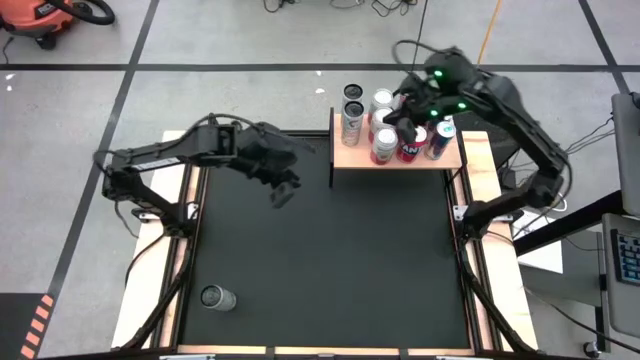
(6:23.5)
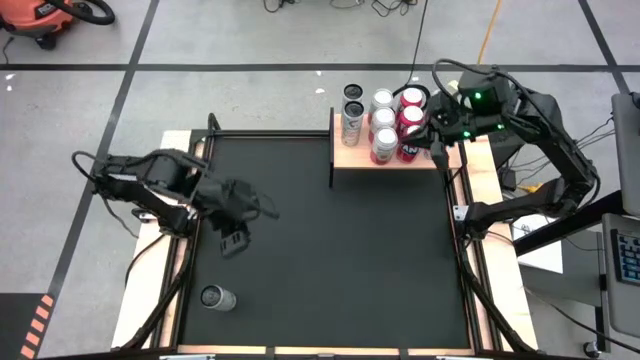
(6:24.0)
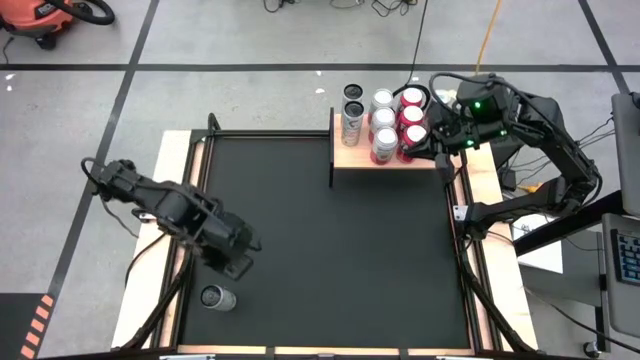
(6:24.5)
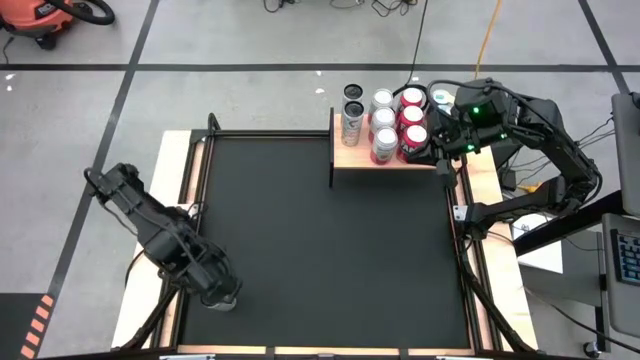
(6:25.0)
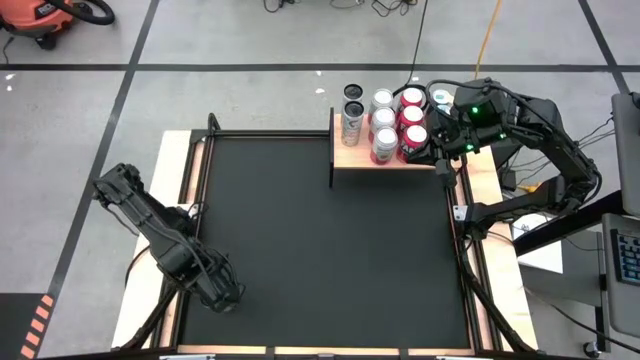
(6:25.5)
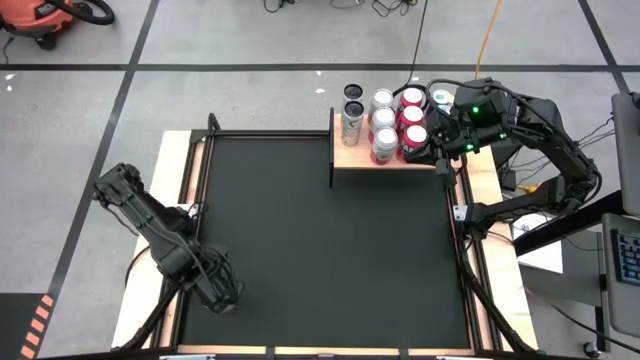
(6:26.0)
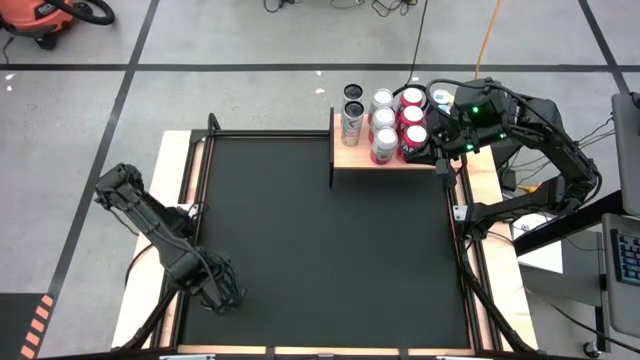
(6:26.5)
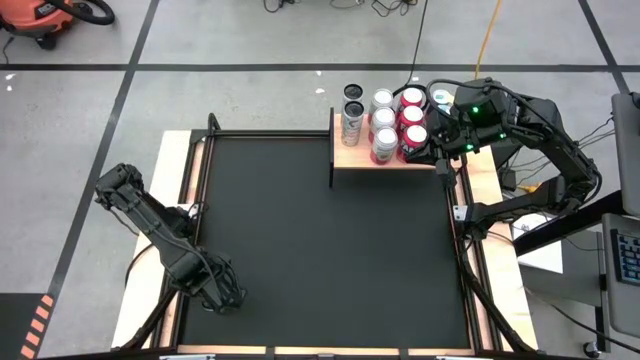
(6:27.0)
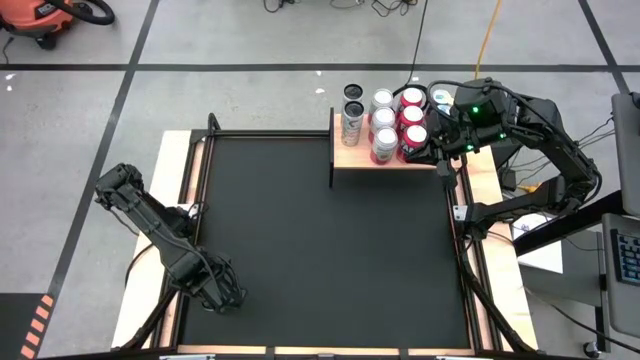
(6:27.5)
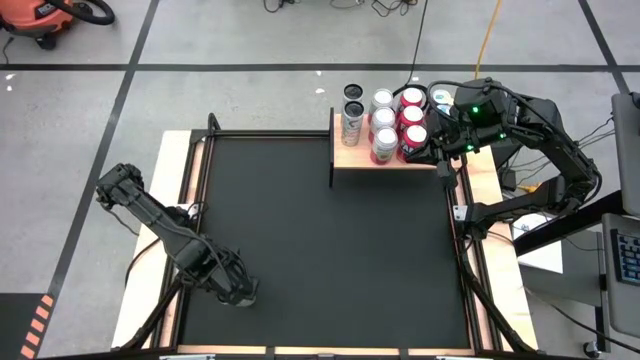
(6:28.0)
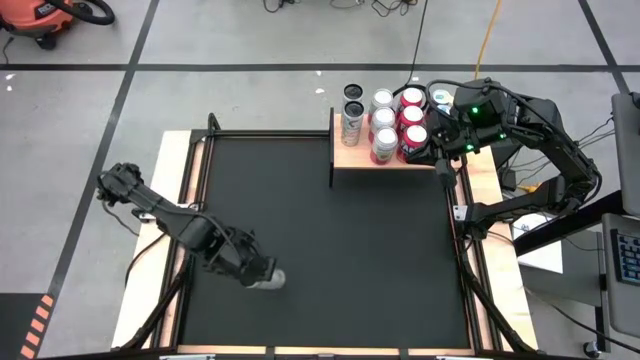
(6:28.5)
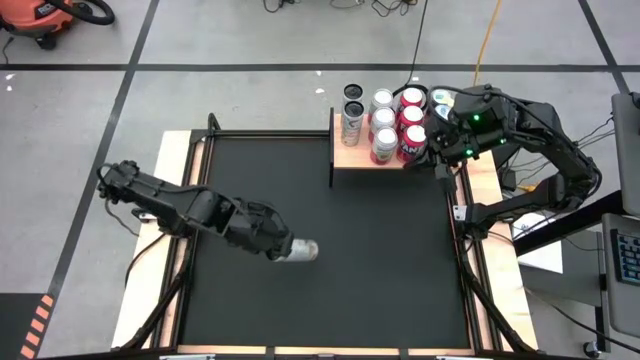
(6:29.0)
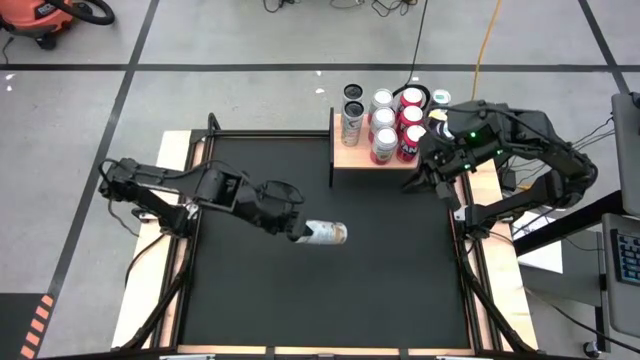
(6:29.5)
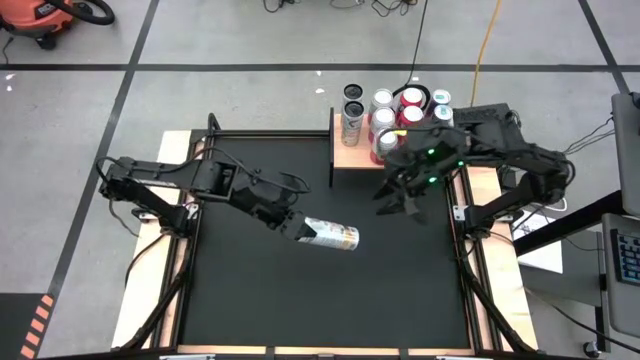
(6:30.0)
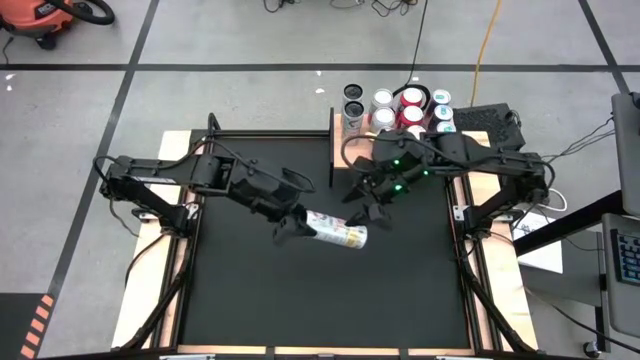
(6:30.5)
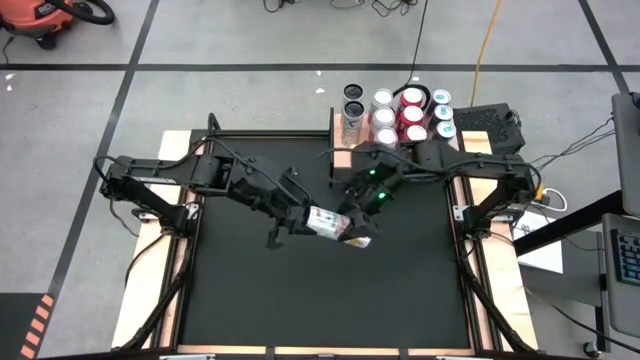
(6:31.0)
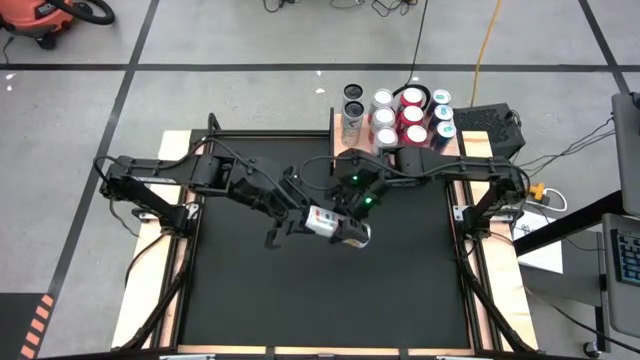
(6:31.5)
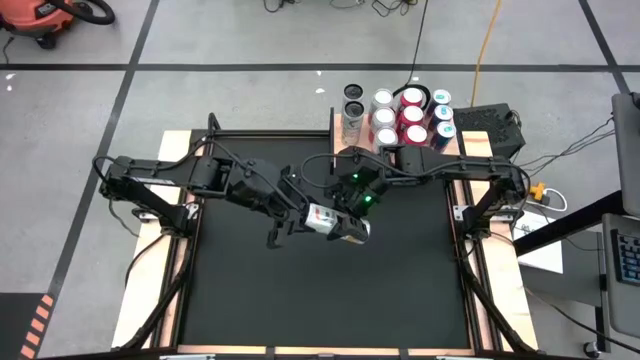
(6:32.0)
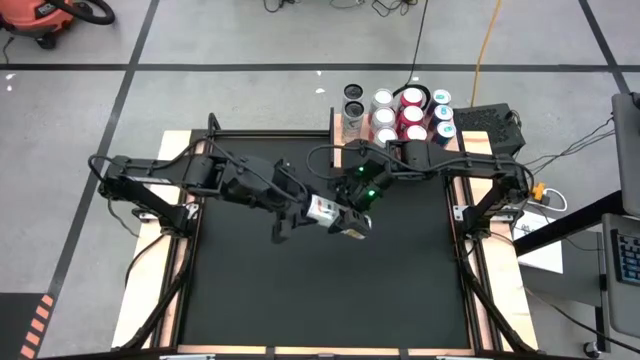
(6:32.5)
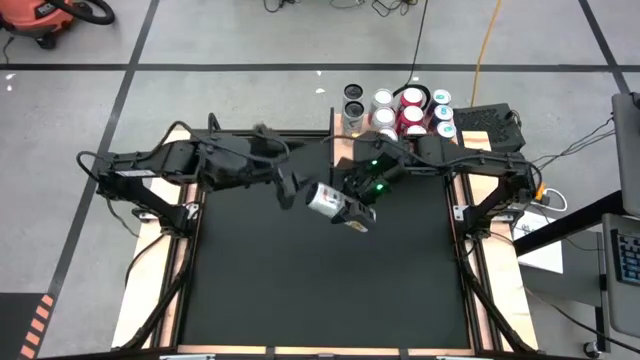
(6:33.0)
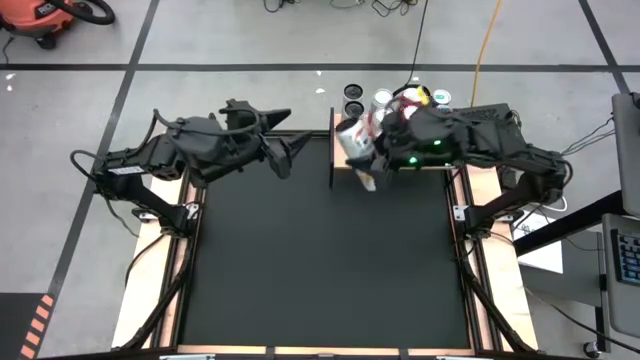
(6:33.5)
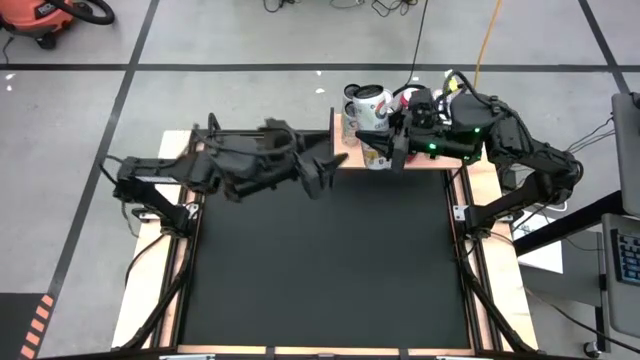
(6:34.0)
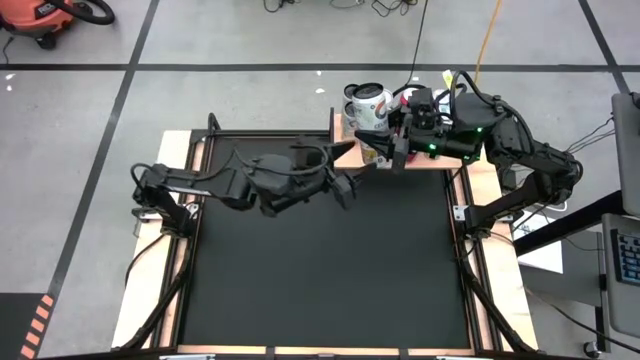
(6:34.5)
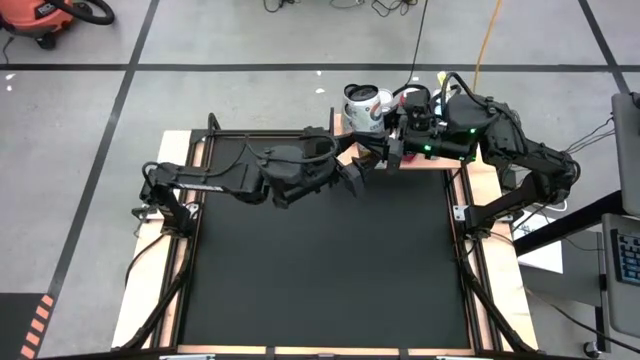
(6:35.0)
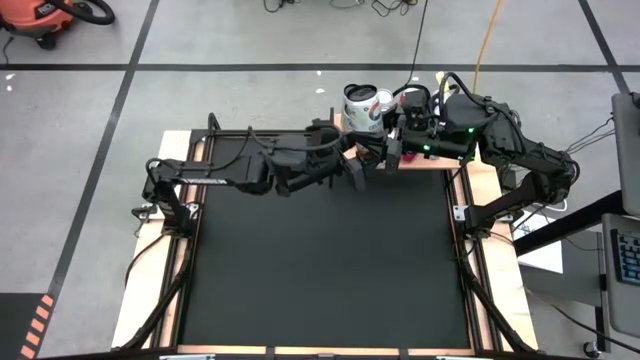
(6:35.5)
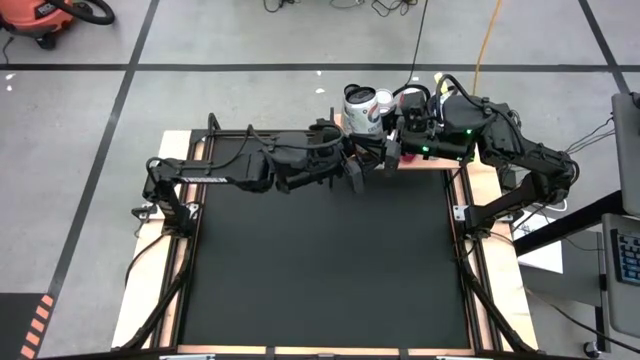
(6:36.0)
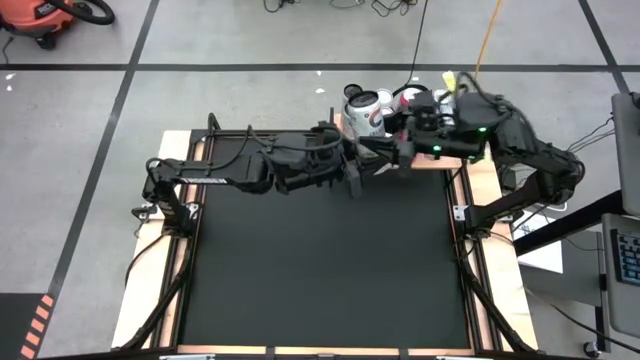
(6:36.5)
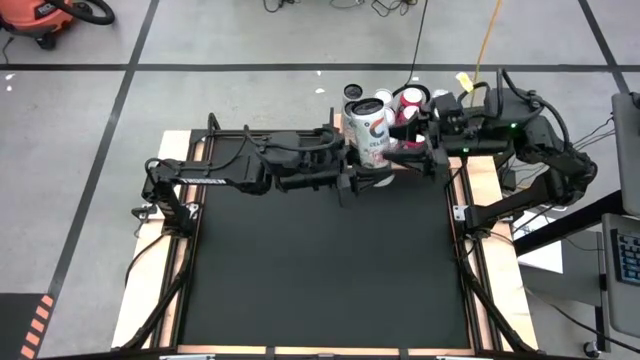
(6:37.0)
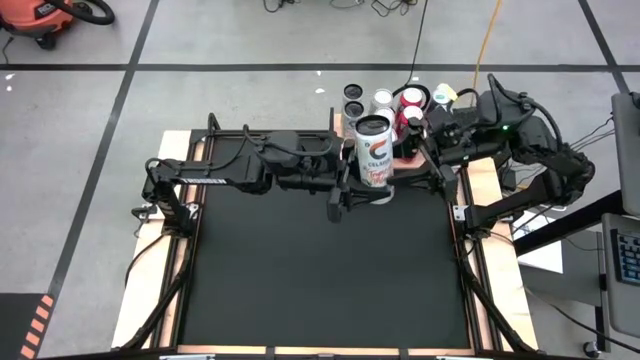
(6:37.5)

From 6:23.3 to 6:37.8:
Task: Place canned beverage on shelf
Put the white yellow soda can on the shelf aligned with the other white yellow soda cans

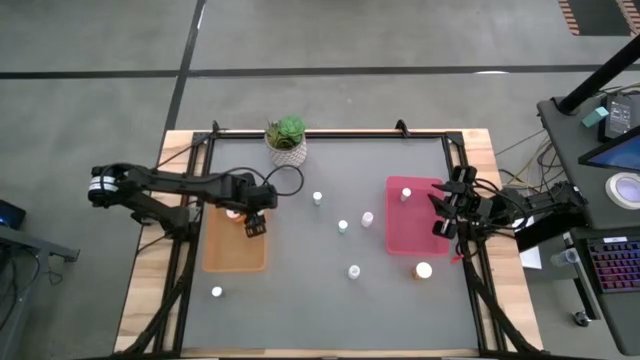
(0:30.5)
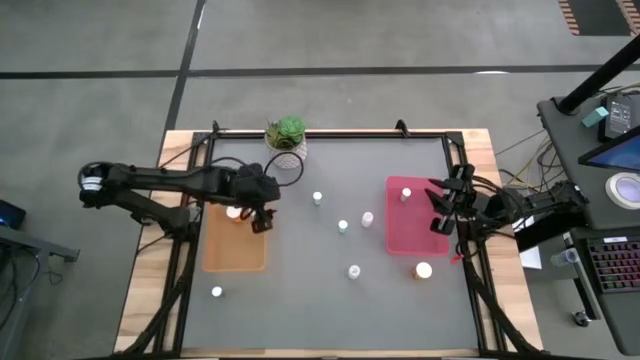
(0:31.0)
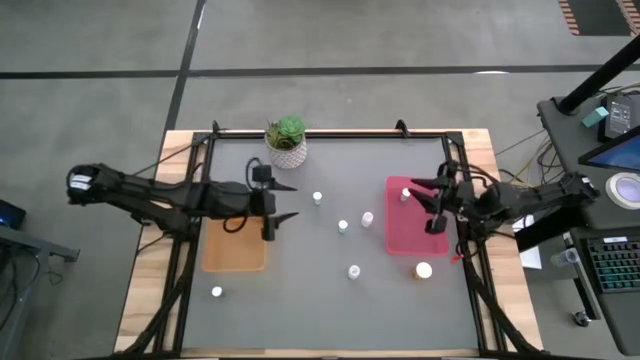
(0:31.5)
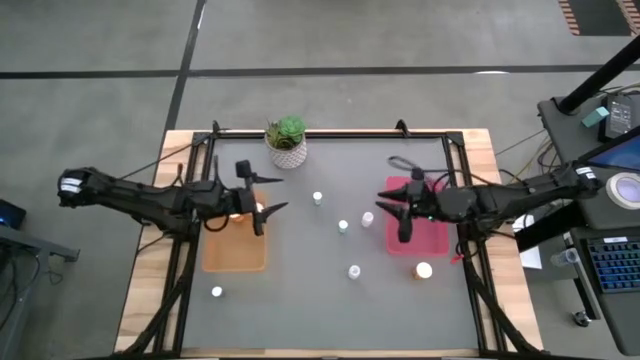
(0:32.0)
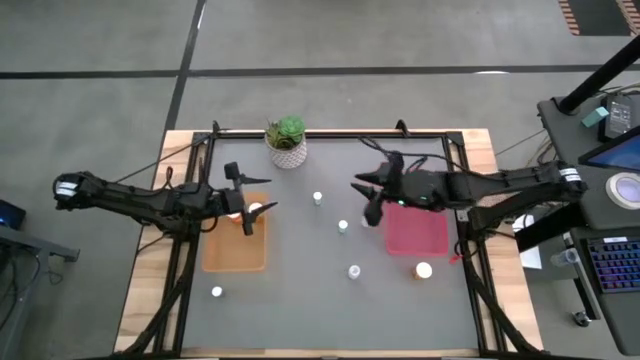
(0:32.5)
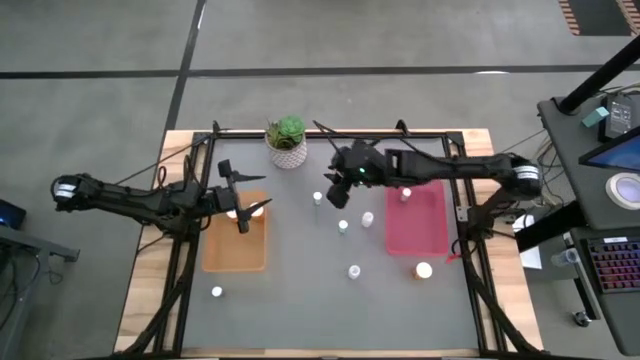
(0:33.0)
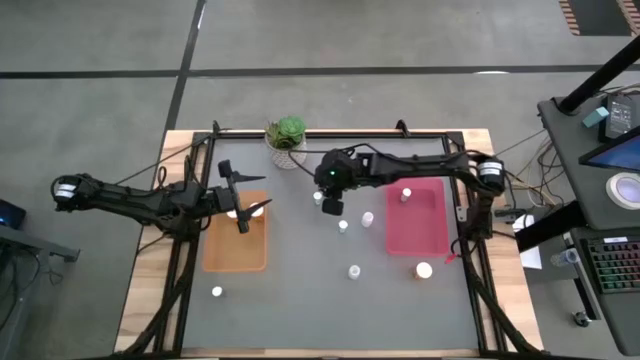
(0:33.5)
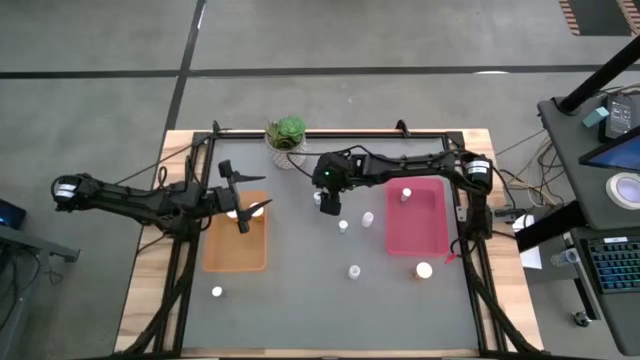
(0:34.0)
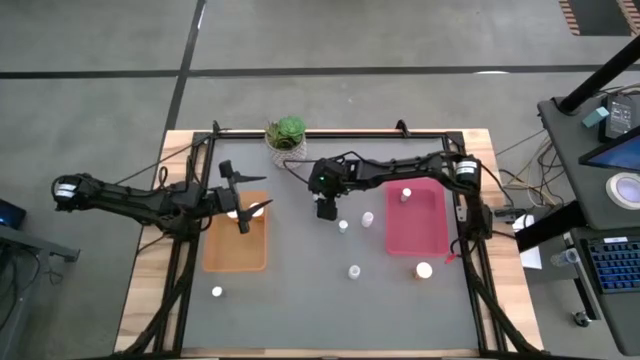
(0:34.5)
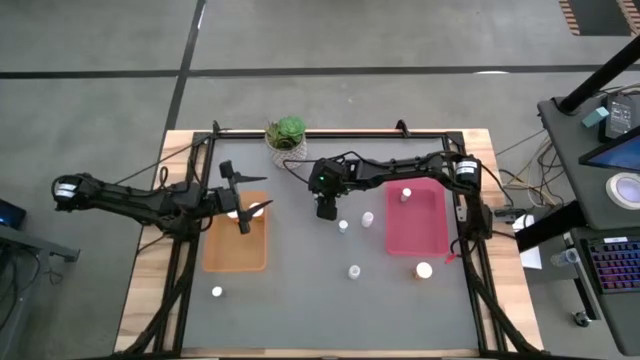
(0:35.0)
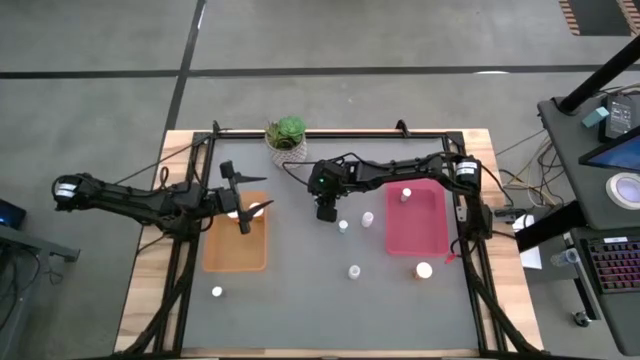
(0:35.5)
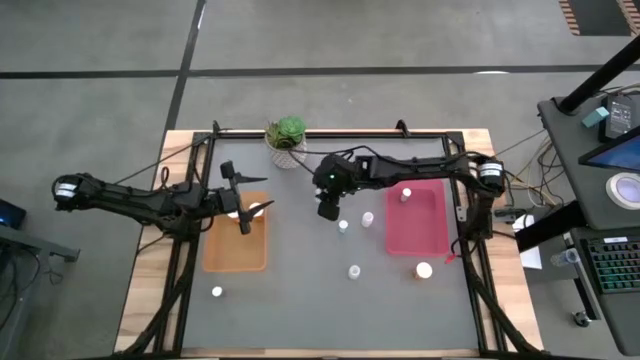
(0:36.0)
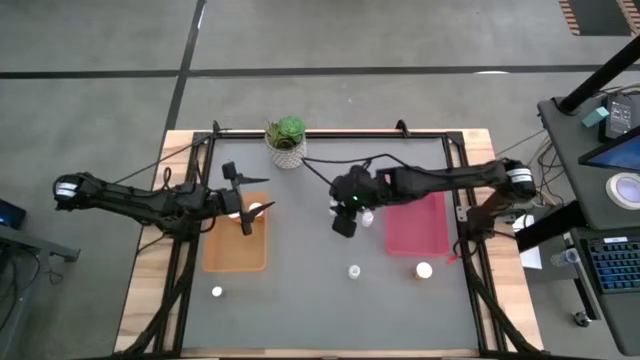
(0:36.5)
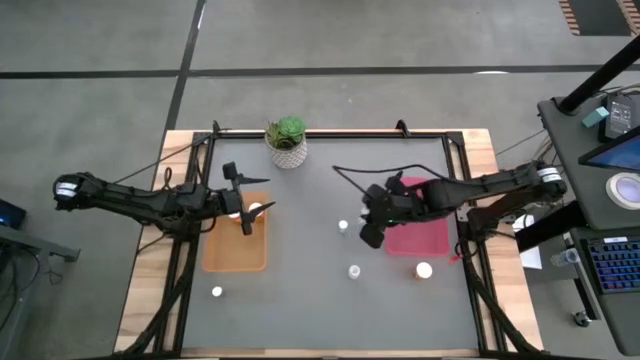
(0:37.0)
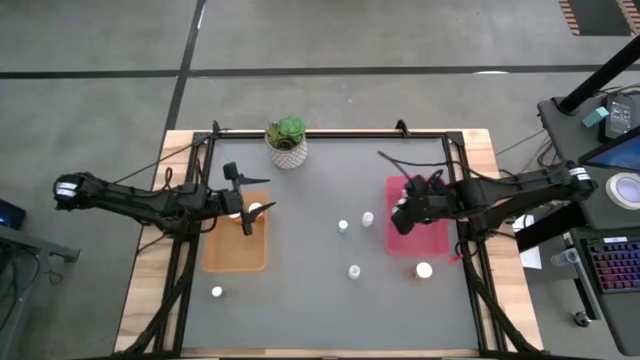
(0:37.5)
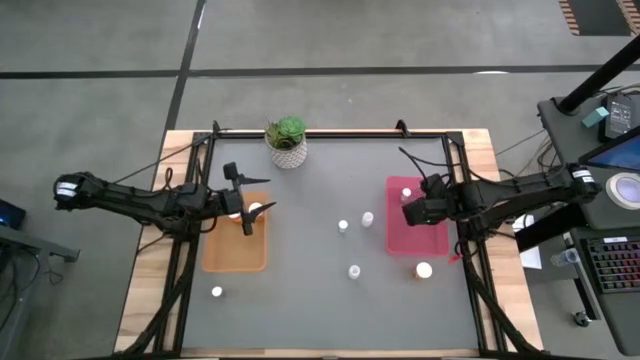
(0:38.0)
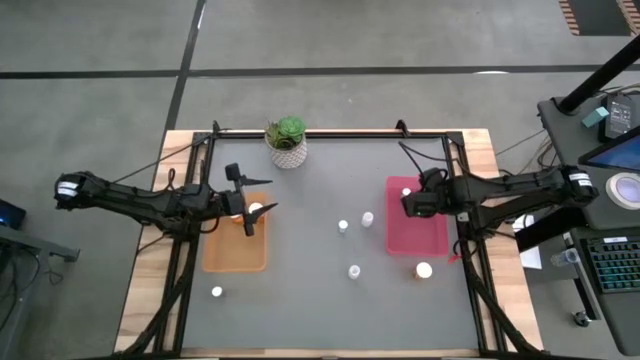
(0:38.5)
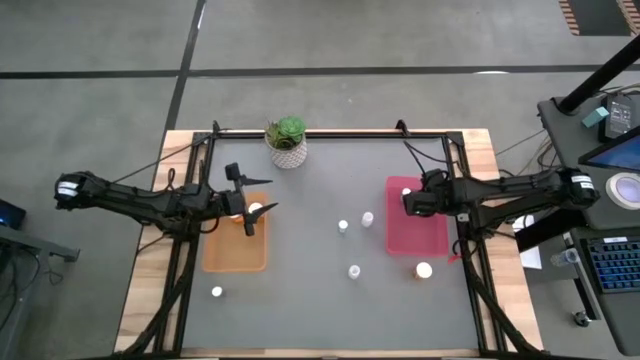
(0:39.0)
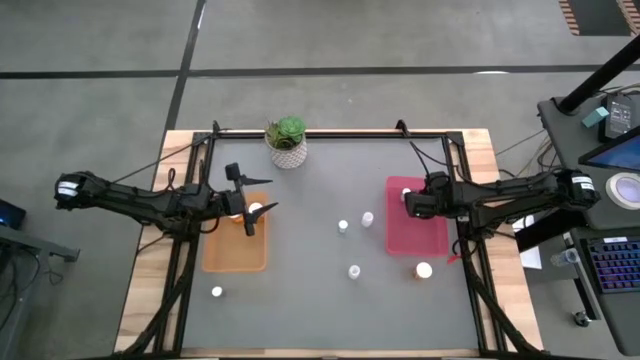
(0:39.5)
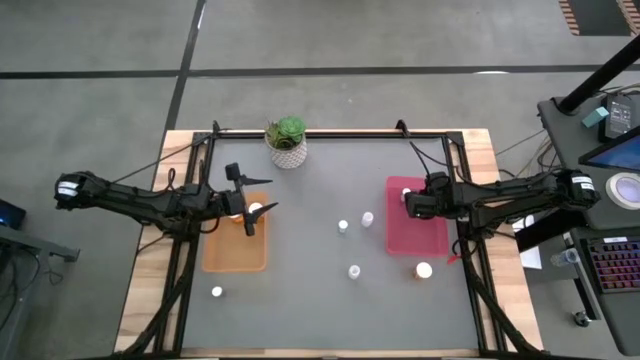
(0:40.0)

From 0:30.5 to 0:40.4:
Task: Pick and place medicine bottles into bin by pill shape (circle, oval)
Put the blue tablet bottle into the pink bin
